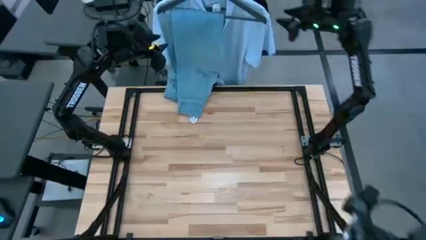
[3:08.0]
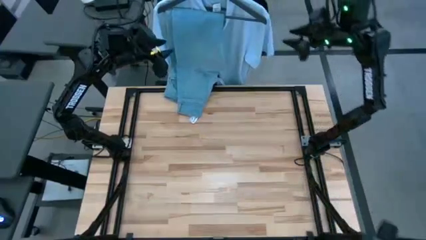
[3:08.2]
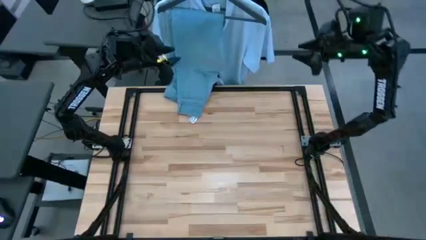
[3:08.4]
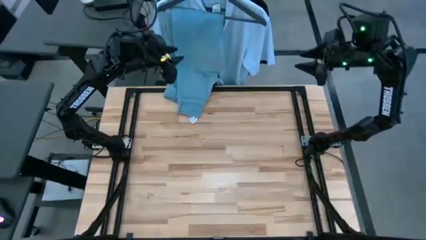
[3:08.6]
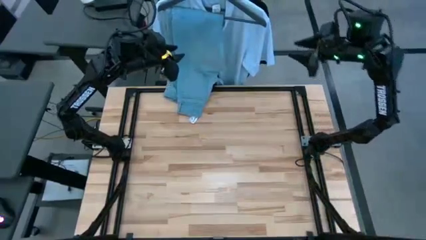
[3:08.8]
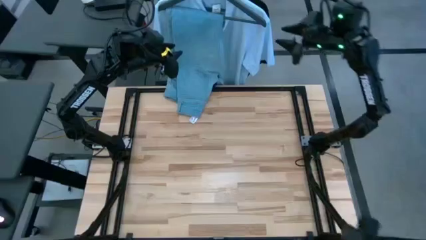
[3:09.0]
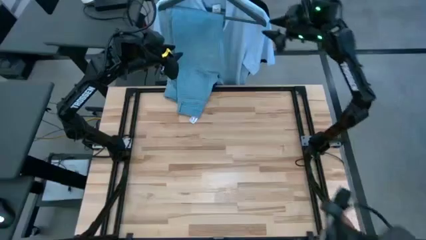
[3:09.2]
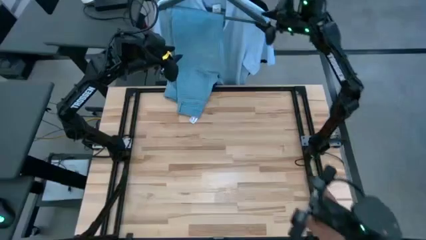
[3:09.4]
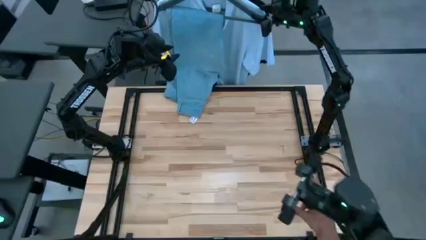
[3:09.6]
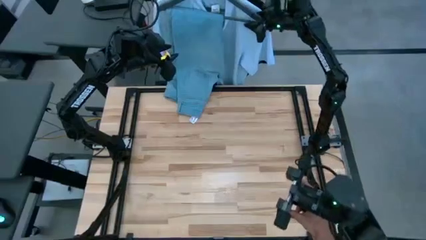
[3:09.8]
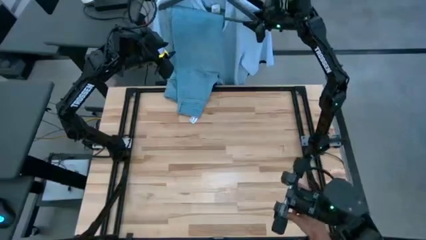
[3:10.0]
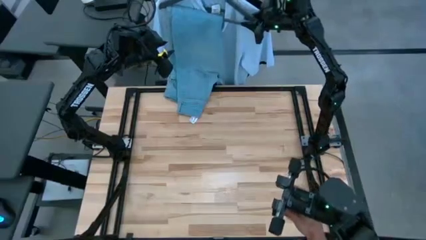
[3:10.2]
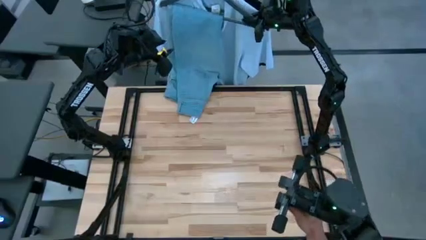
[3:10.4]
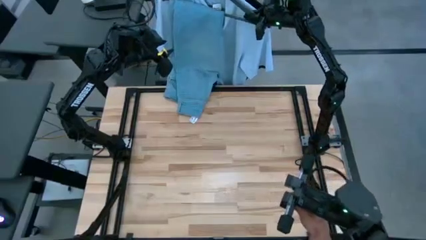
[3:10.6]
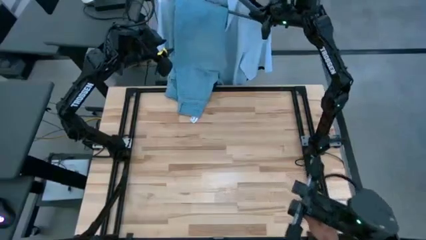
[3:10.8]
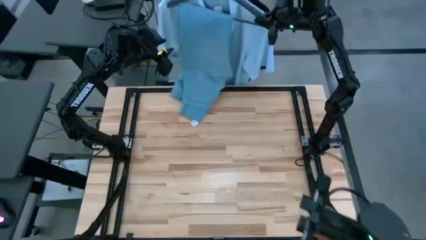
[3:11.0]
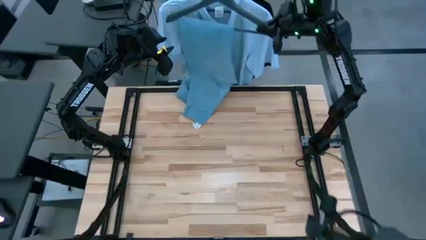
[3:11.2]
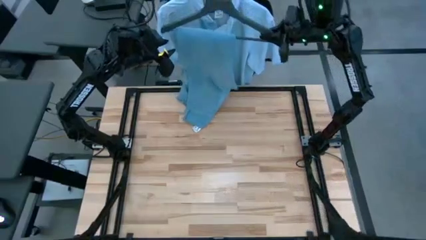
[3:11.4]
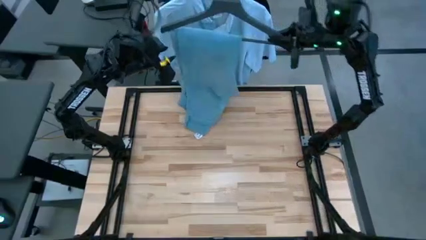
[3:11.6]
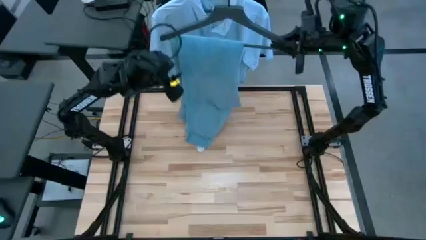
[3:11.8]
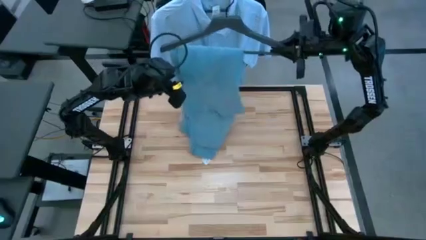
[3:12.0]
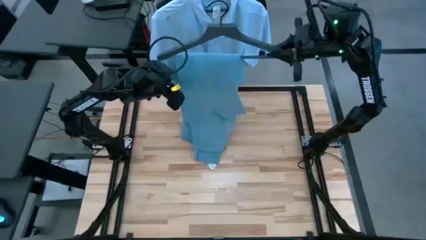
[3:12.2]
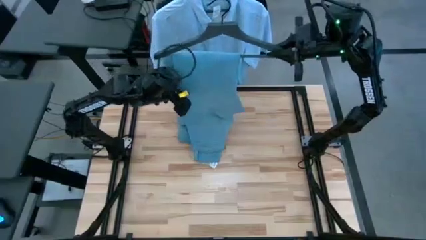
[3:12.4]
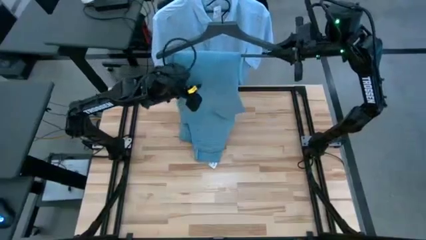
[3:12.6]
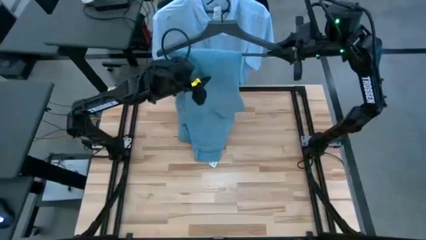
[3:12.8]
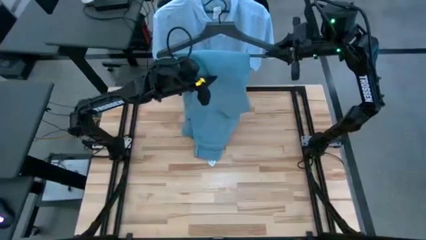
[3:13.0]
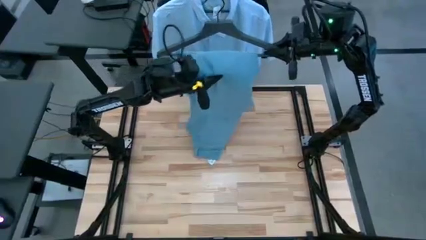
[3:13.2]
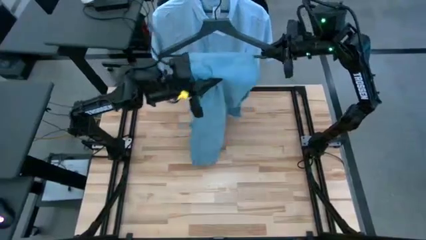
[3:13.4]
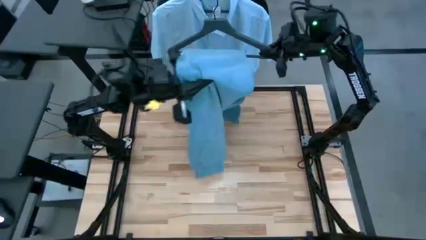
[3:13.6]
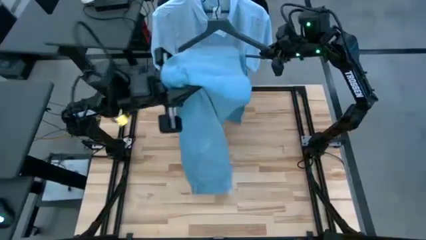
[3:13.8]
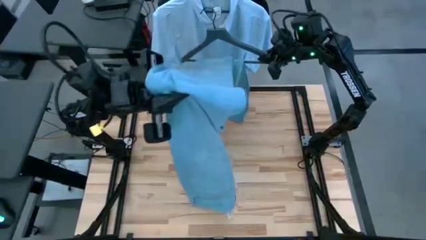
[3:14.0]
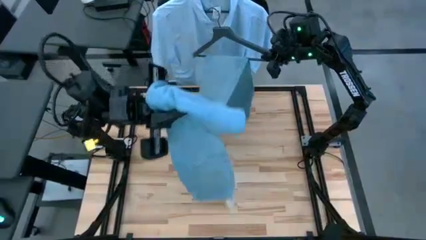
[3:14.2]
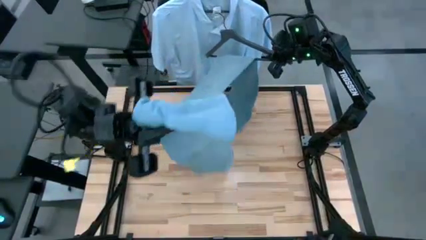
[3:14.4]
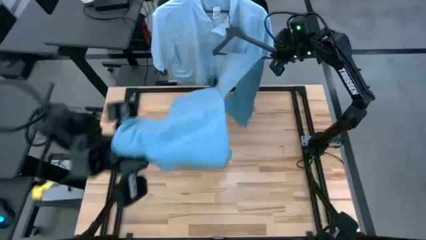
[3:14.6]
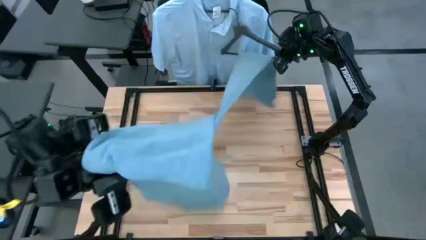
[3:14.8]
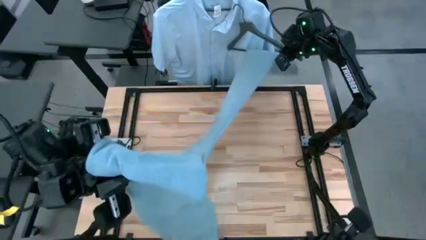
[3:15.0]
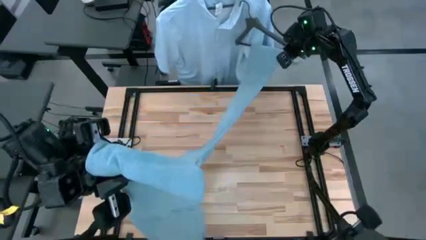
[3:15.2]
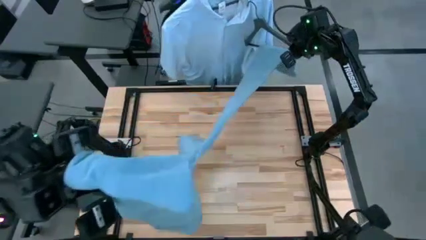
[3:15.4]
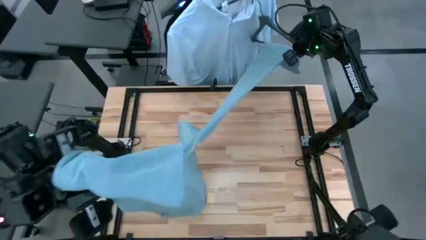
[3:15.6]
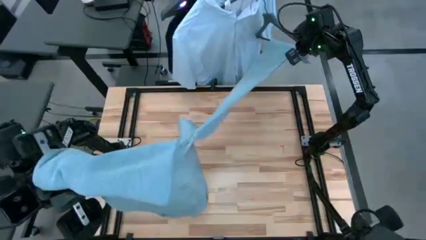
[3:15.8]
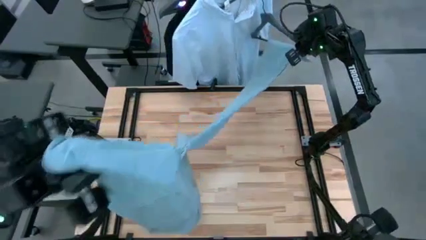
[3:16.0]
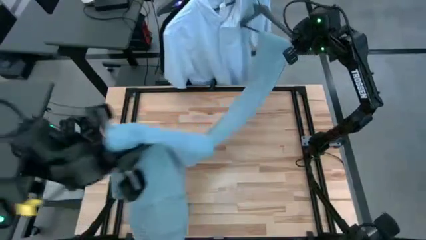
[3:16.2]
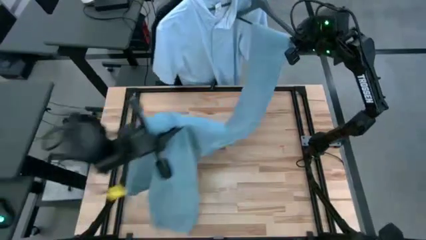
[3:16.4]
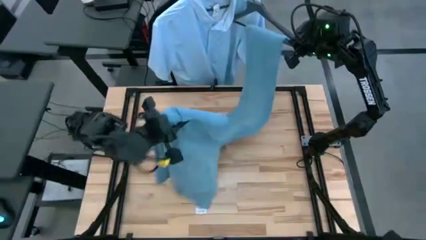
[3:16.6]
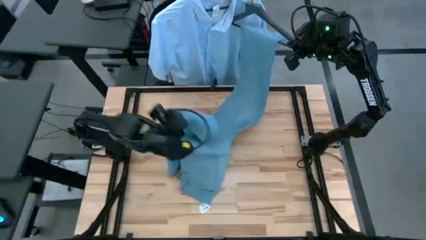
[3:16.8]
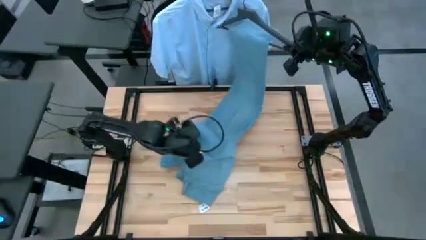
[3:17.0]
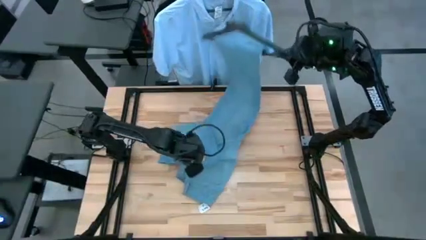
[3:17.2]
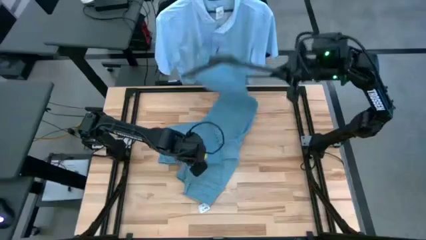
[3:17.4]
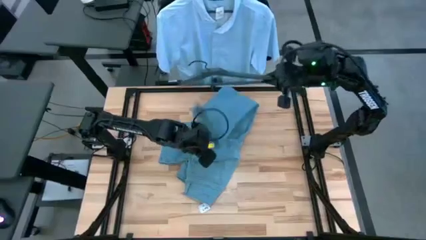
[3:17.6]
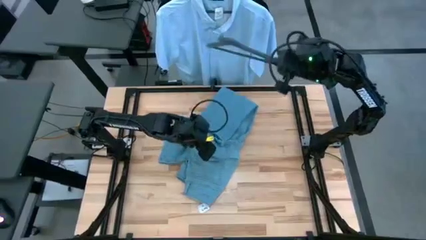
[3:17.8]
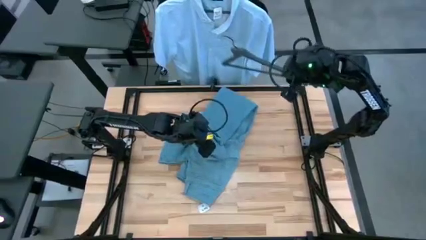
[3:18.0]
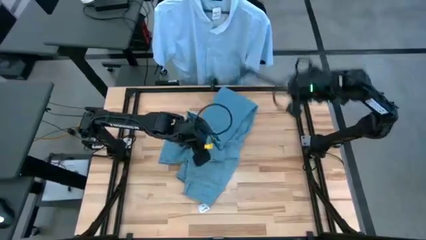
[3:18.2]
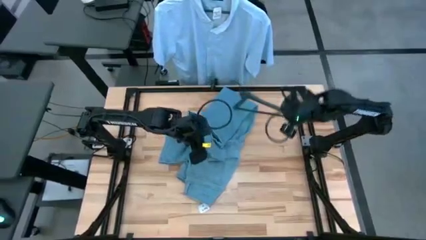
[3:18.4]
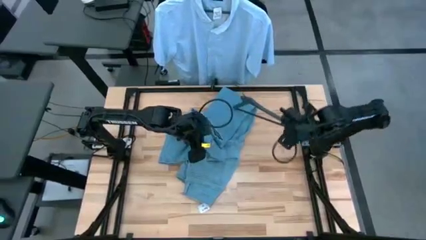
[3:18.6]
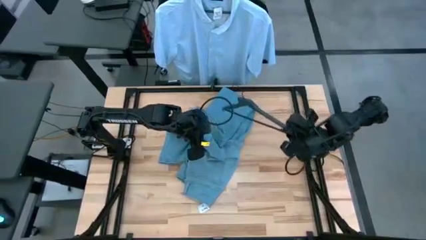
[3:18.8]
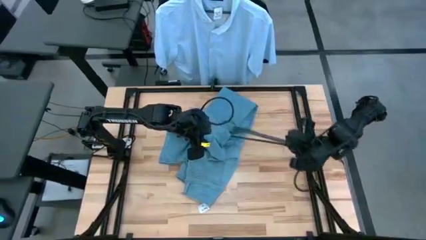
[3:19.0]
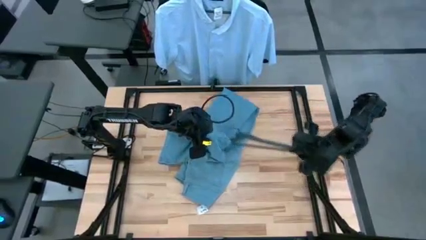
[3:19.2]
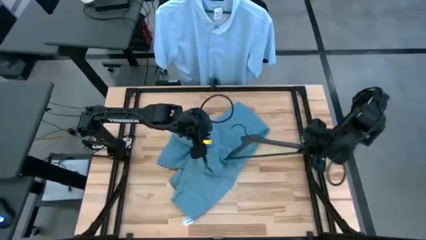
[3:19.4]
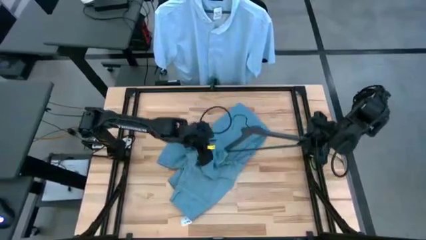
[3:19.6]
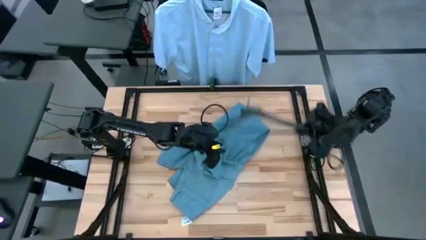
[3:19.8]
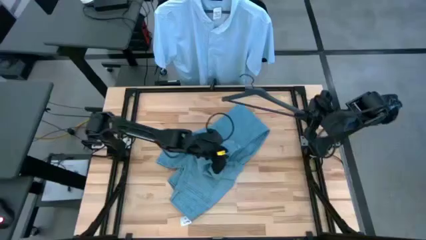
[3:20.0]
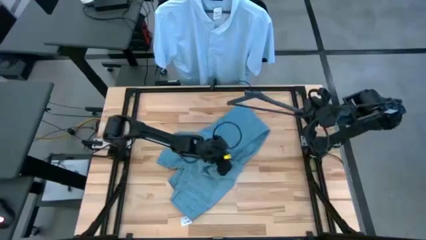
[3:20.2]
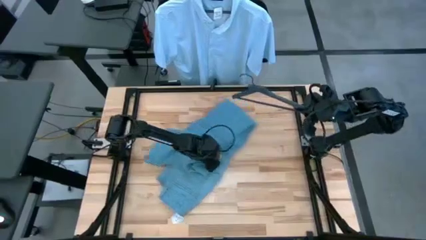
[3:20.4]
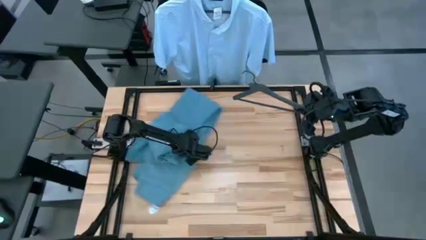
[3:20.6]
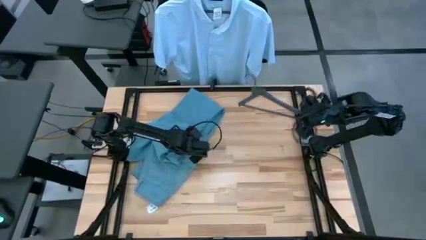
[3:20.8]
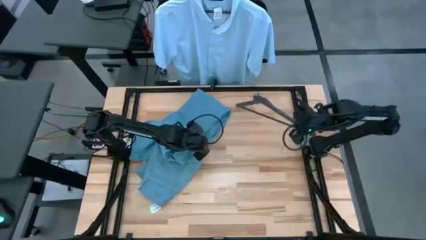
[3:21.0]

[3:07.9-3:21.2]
Task: Hang clothes
Unhang the blue jeans from the rack

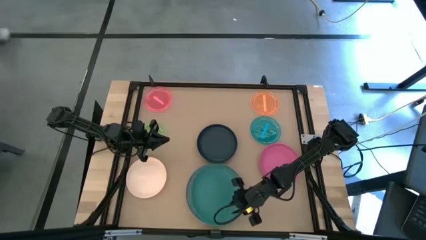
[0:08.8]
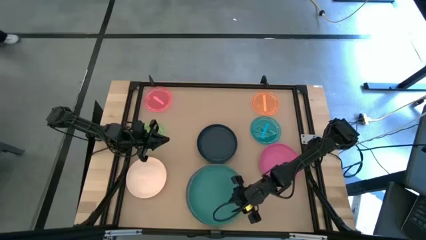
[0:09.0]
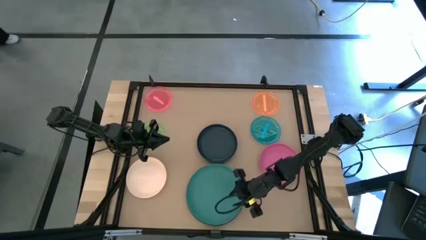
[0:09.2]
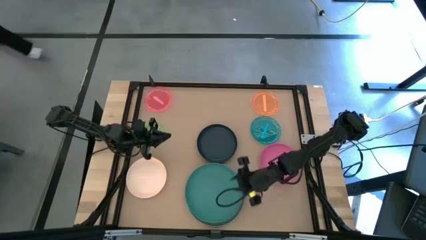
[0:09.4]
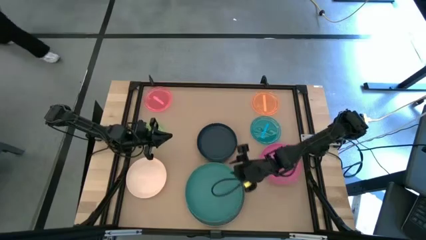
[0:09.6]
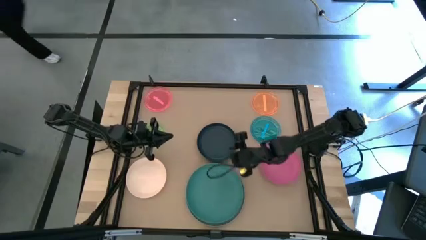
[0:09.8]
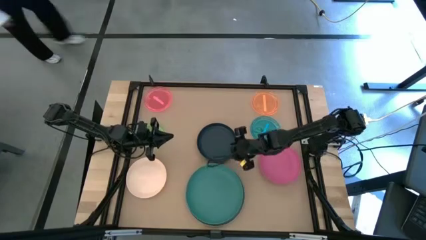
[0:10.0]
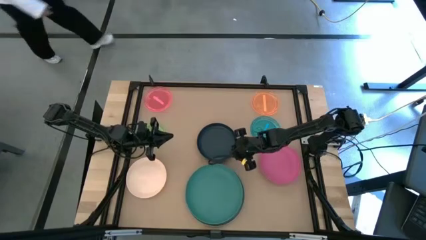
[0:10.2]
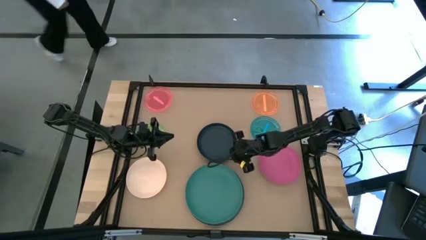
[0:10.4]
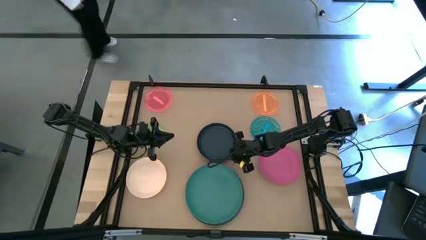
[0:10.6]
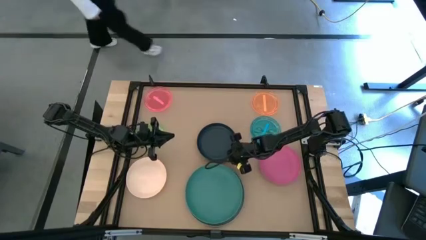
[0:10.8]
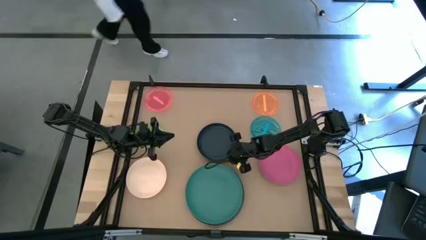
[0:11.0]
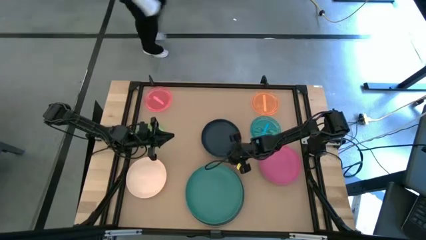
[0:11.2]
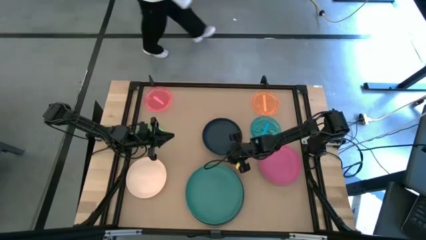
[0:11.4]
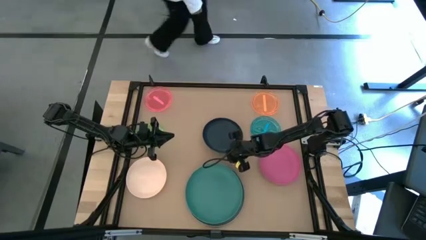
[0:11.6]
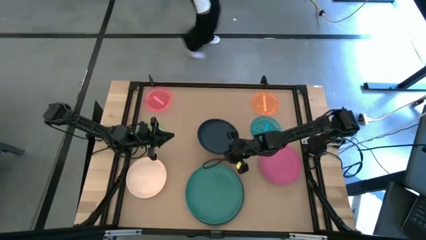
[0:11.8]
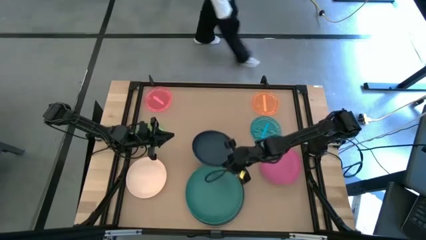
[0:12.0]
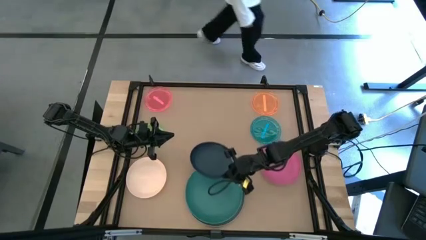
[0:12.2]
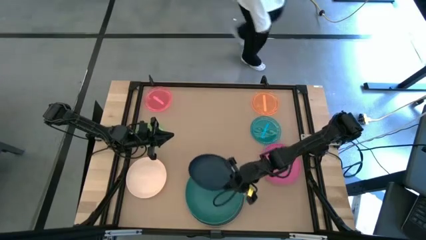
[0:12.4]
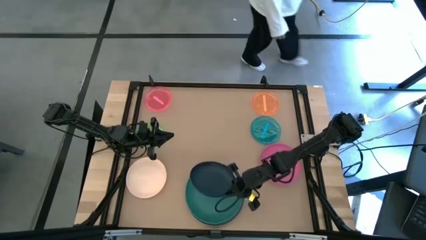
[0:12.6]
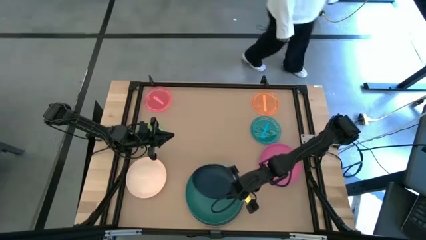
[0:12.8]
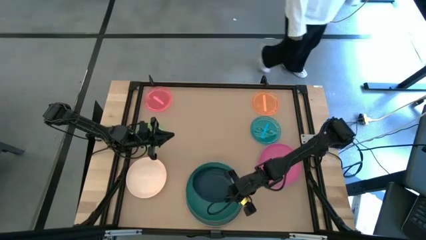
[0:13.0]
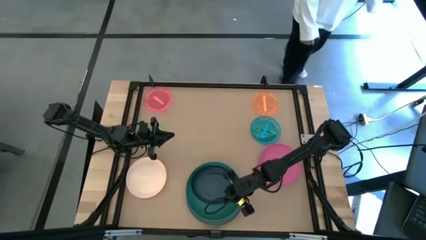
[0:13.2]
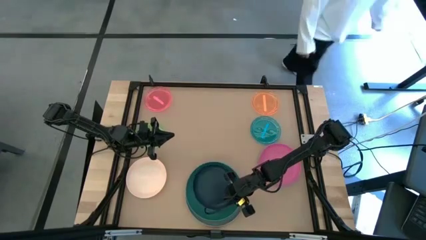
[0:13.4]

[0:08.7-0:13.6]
Task: Stack plastic plates
Stack the black plate on top of the green plate
